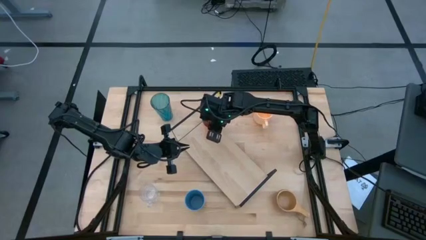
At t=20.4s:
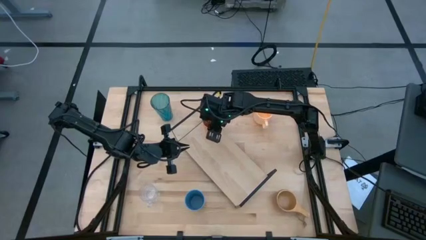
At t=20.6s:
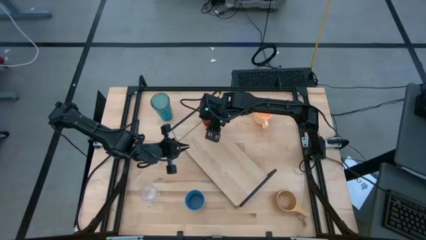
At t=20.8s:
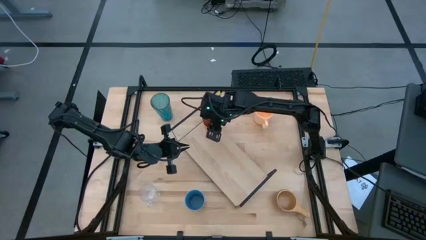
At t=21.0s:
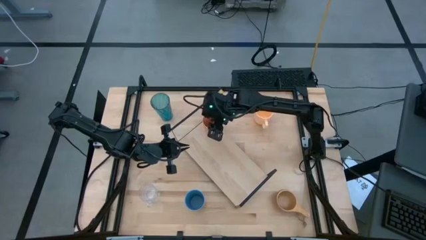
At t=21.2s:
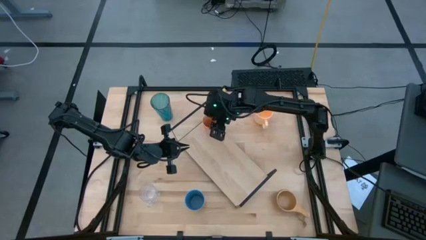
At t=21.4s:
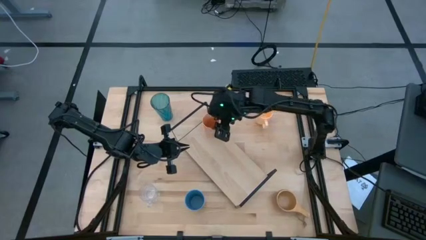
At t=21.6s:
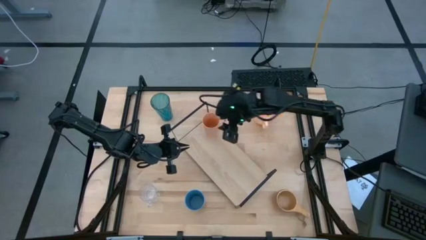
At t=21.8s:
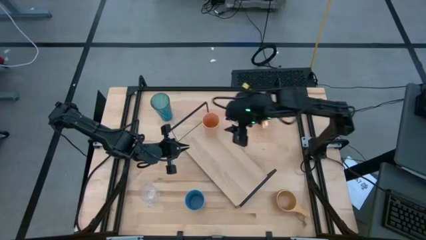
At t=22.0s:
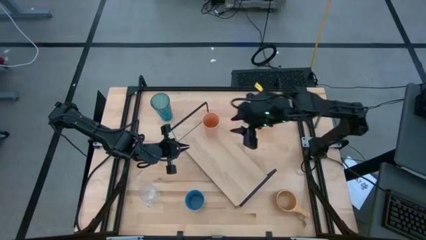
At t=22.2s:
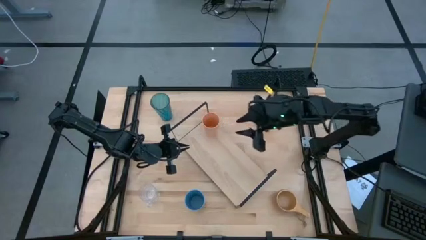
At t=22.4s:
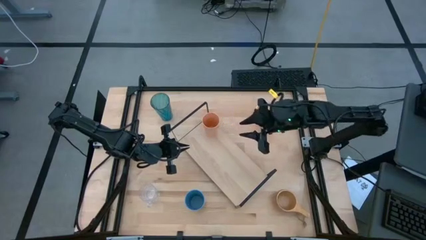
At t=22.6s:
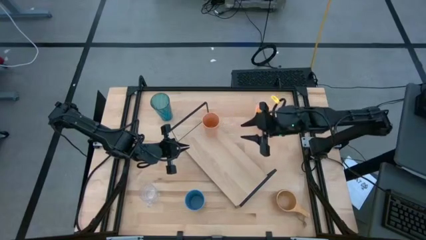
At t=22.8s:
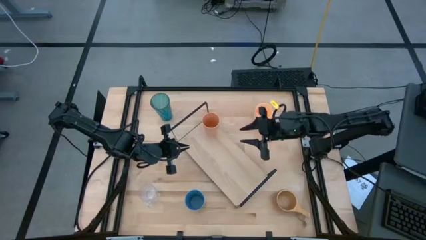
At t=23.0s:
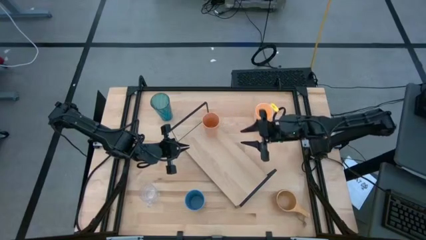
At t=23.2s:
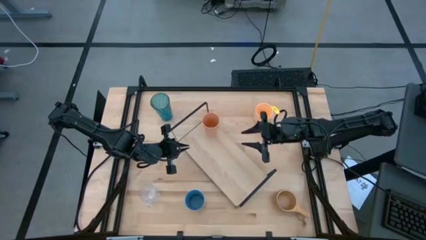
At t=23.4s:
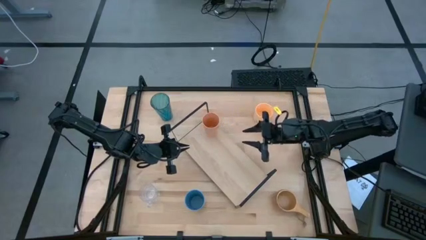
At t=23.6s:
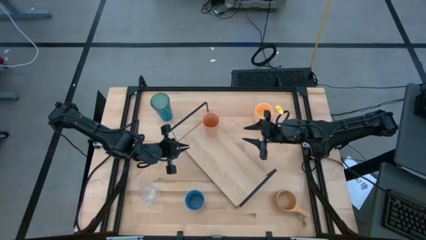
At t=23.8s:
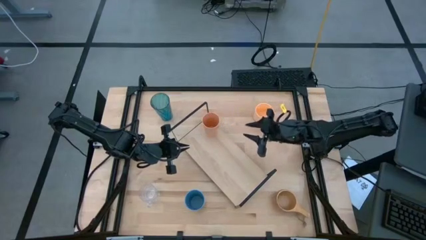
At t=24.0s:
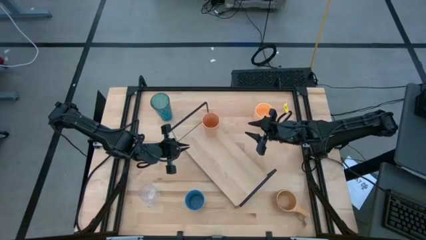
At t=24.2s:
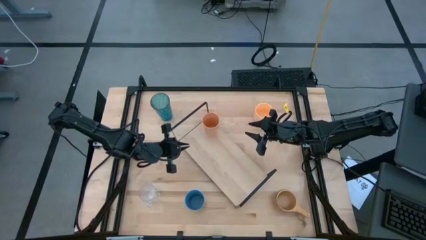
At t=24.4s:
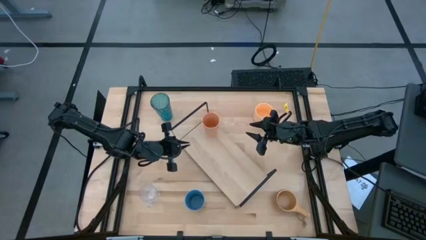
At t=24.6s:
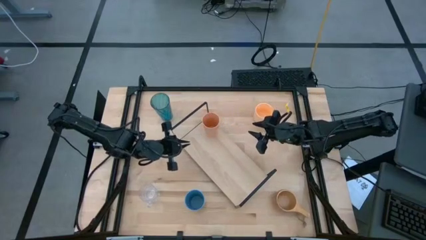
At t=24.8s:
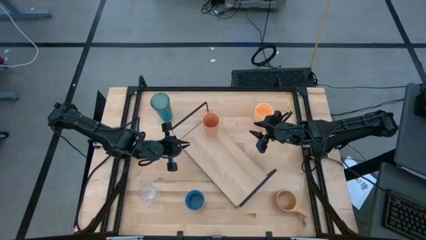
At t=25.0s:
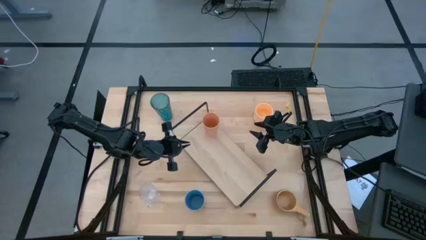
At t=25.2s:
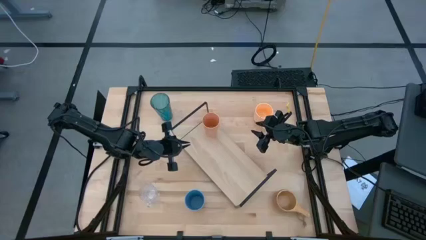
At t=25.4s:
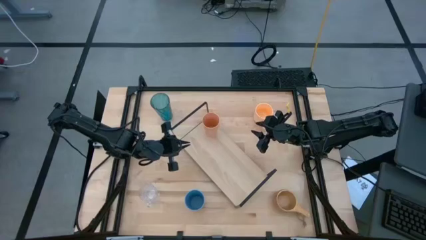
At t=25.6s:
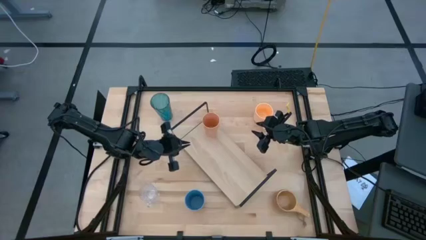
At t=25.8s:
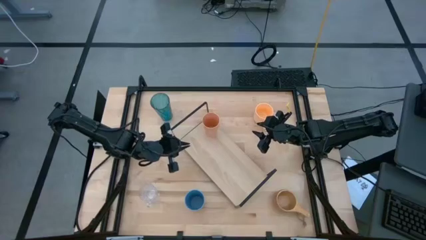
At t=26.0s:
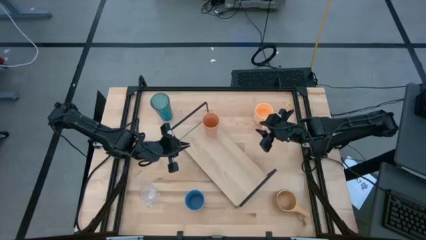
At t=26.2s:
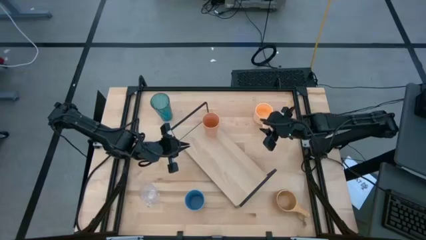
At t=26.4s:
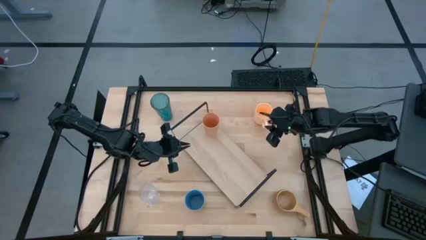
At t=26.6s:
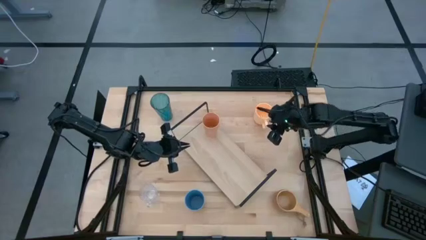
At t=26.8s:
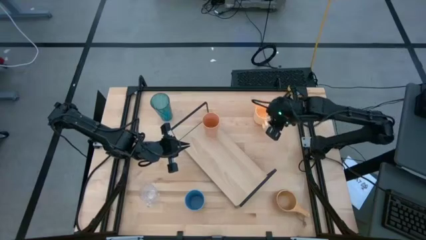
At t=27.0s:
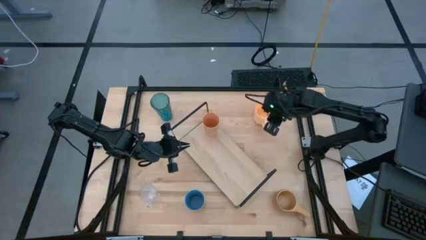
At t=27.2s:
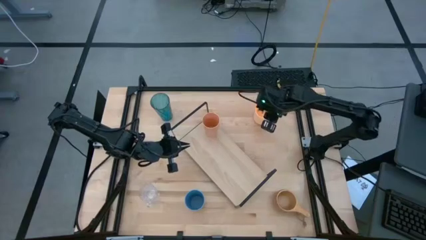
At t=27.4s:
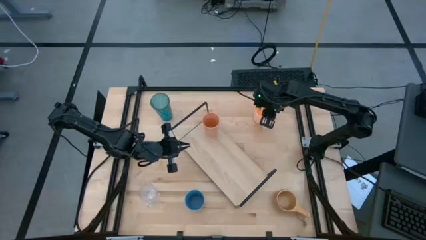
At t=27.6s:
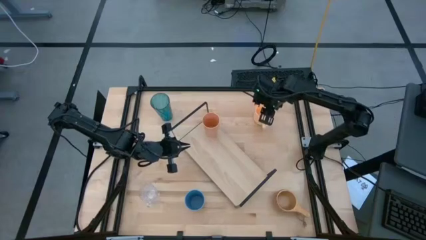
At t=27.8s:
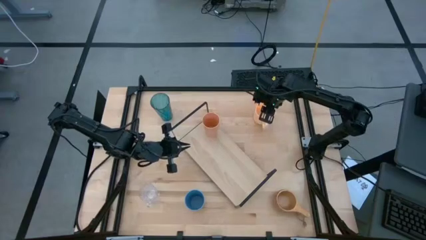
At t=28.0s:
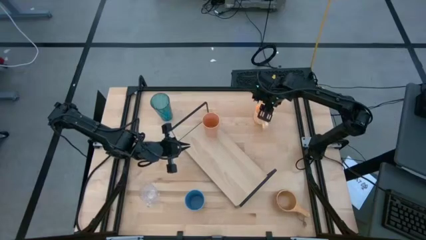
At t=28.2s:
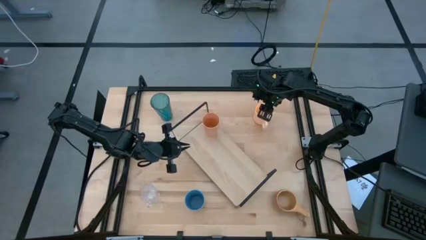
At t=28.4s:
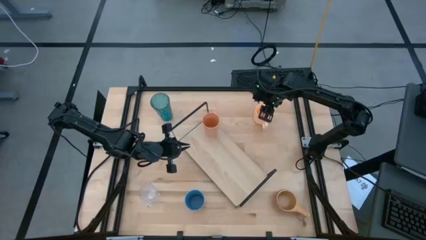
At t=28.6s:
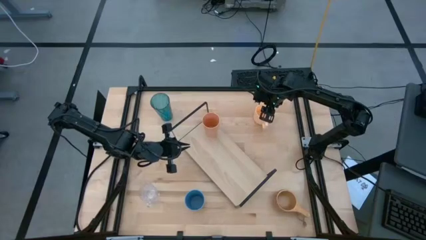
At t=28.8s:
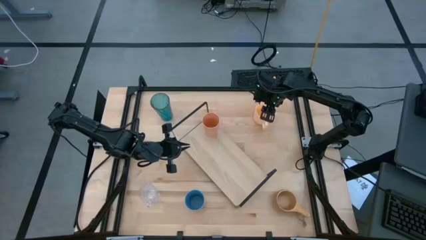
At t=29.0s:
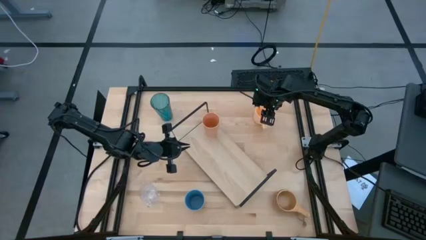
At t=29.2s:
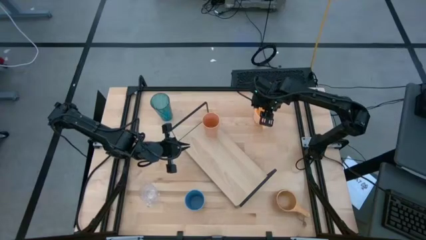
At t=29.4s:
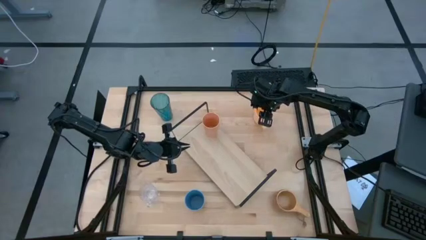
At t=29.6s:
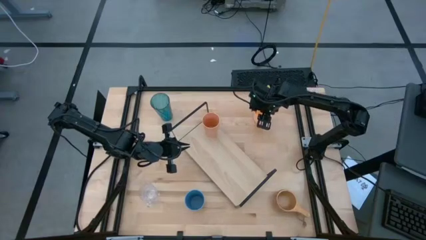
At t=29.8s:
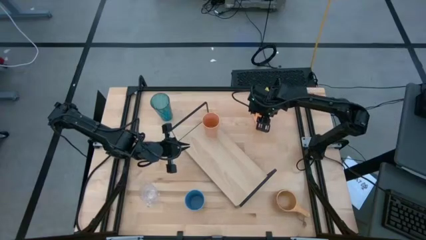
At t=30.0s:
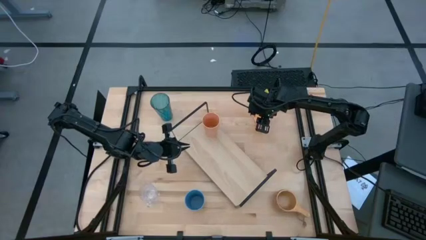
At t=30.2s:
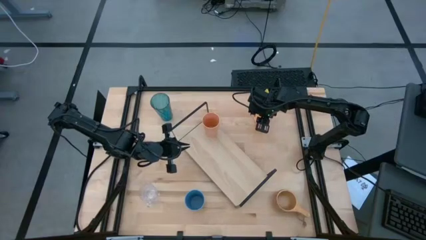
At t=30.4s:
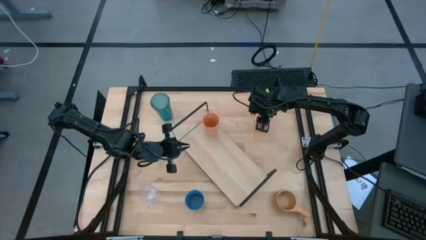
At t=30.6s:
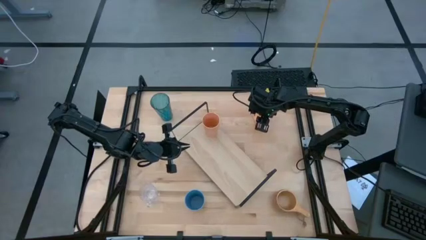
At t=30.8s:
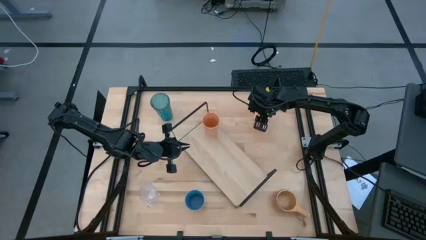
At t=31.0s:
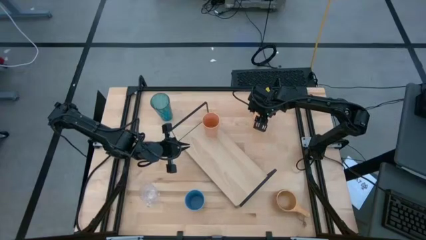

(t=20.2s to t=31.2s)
Task: Stack small to large cups/mugs on shelf
Put the yellow mug on the shelf
